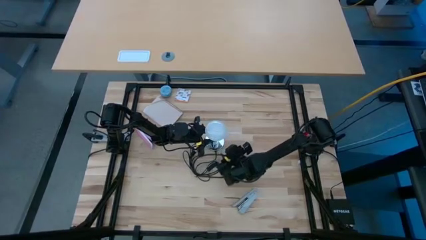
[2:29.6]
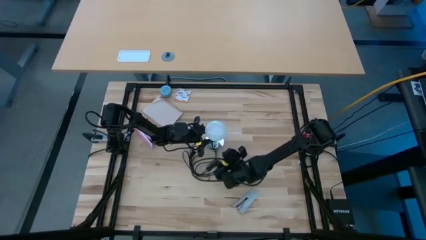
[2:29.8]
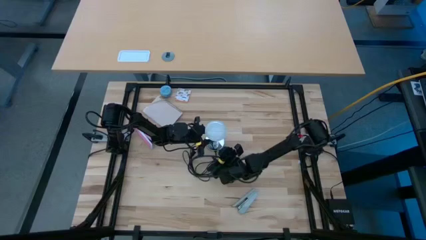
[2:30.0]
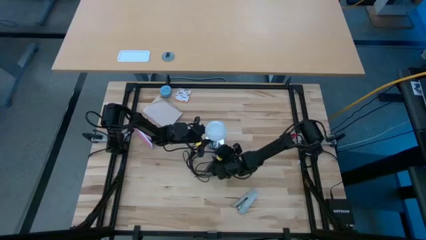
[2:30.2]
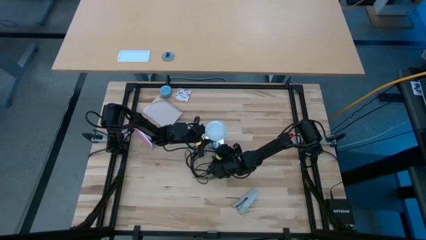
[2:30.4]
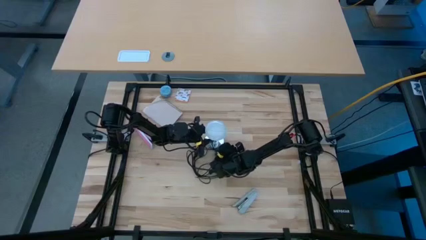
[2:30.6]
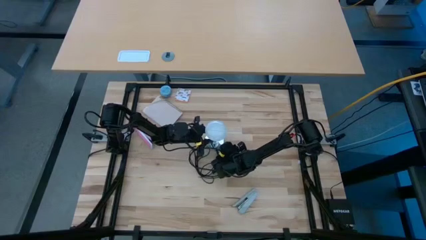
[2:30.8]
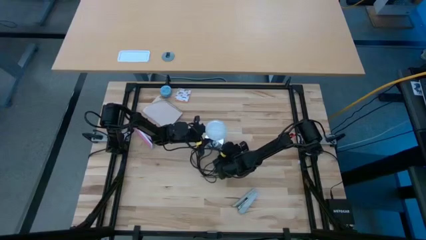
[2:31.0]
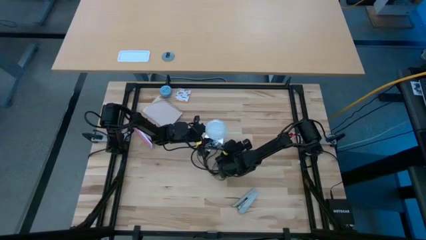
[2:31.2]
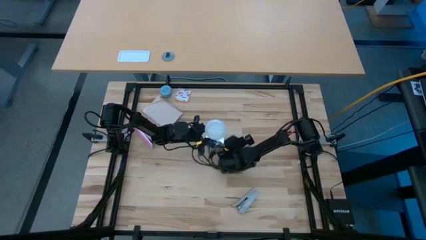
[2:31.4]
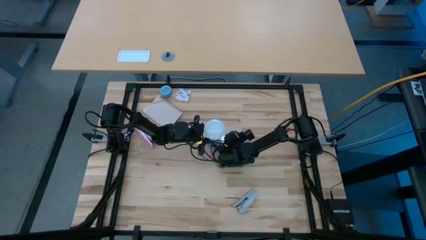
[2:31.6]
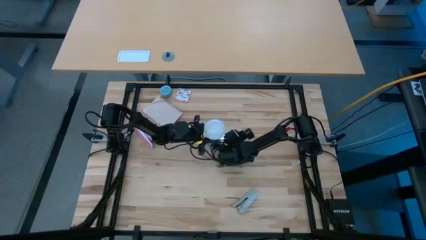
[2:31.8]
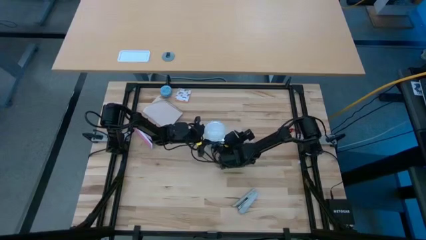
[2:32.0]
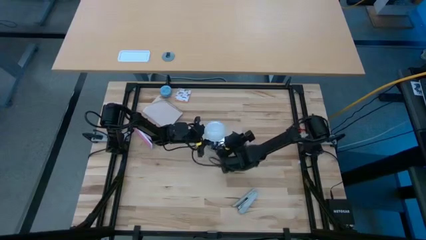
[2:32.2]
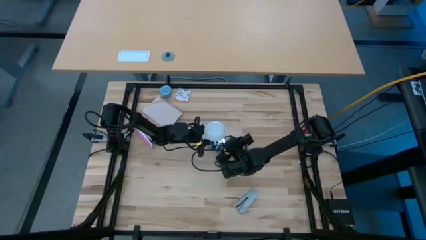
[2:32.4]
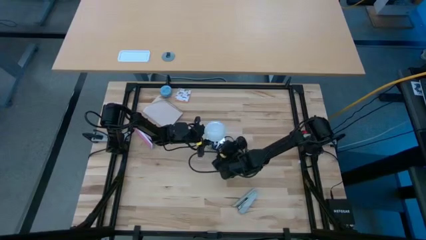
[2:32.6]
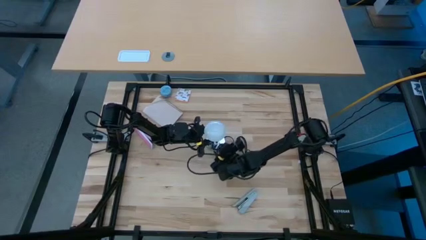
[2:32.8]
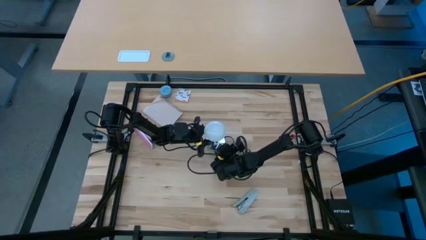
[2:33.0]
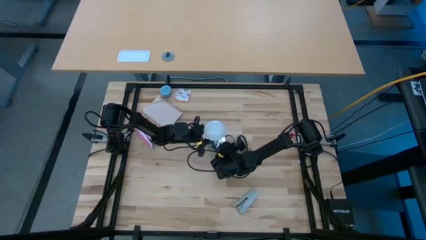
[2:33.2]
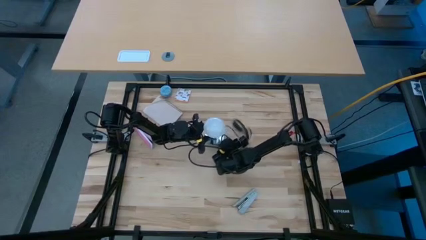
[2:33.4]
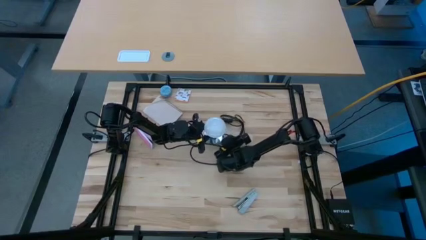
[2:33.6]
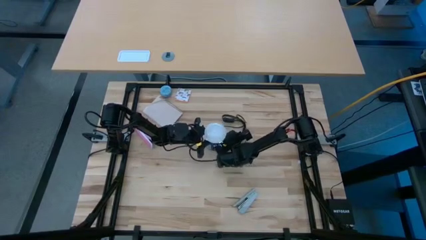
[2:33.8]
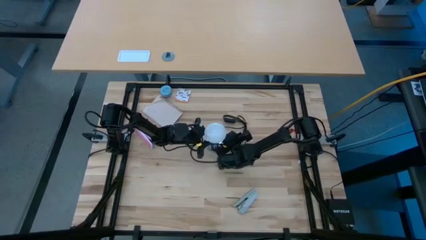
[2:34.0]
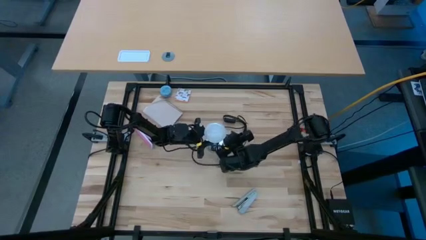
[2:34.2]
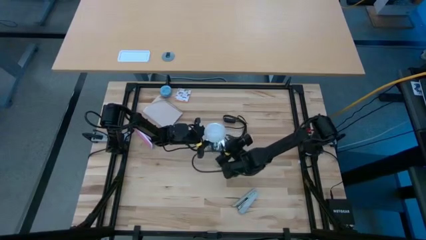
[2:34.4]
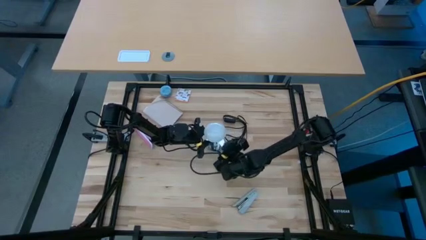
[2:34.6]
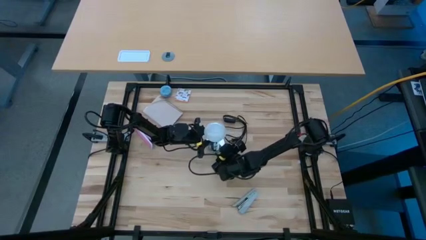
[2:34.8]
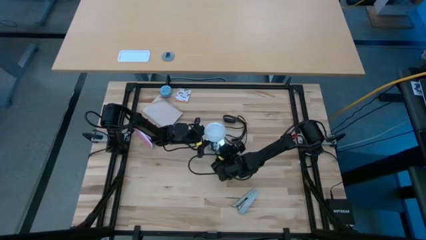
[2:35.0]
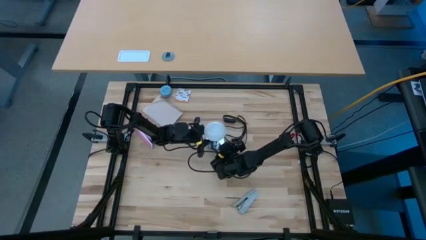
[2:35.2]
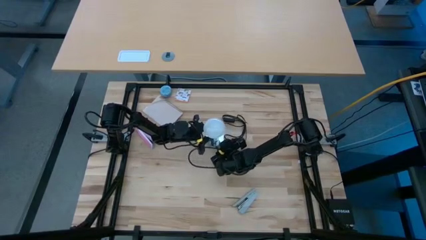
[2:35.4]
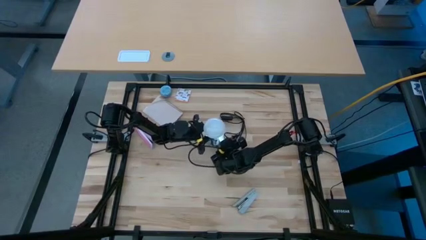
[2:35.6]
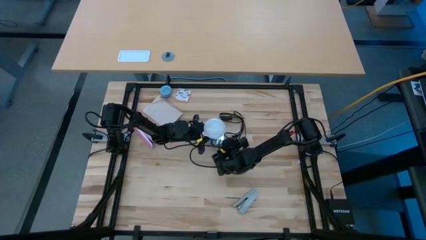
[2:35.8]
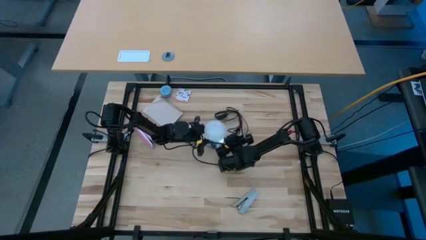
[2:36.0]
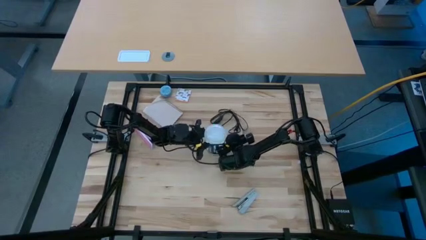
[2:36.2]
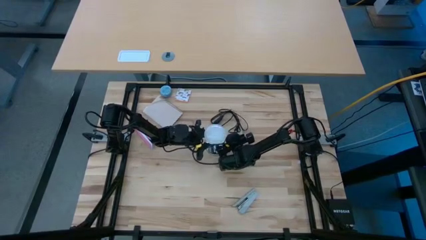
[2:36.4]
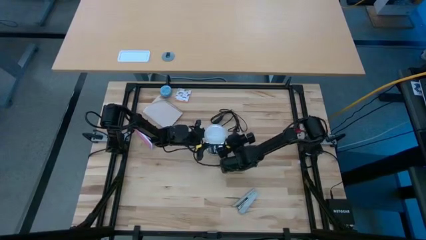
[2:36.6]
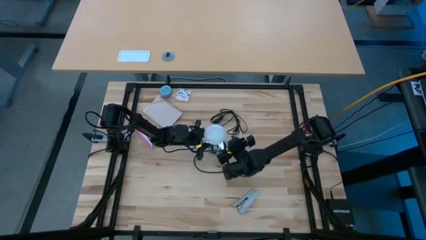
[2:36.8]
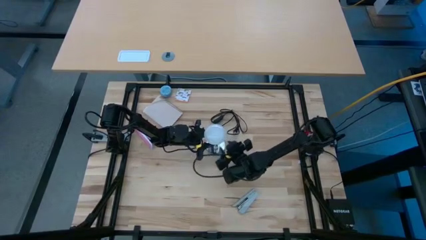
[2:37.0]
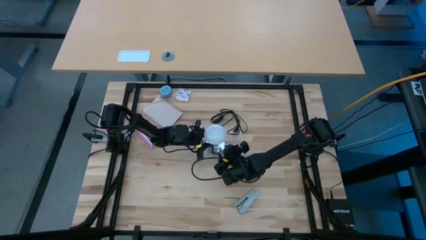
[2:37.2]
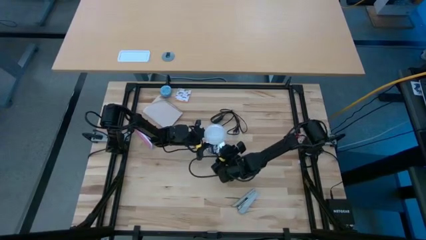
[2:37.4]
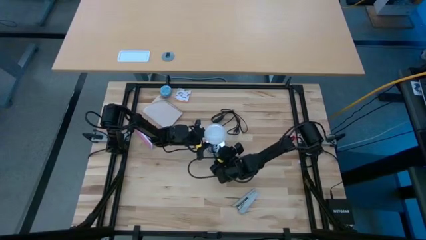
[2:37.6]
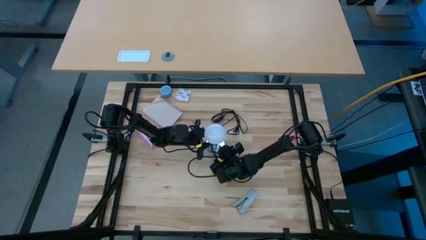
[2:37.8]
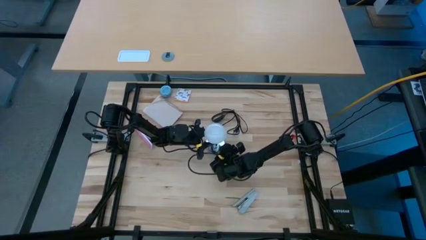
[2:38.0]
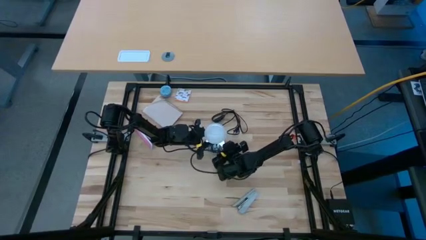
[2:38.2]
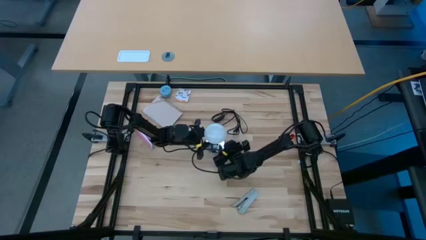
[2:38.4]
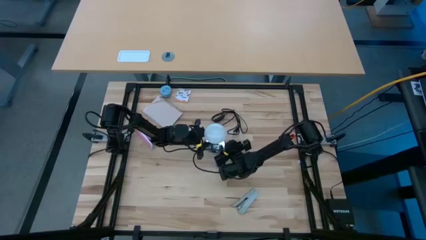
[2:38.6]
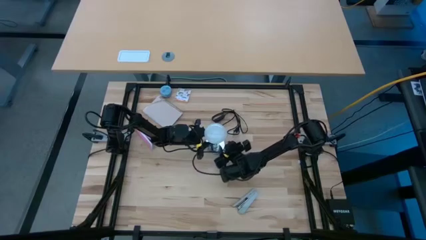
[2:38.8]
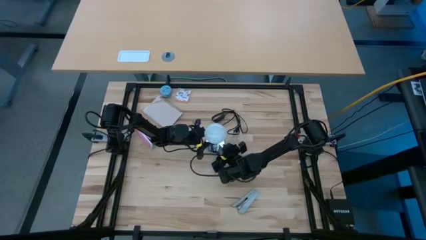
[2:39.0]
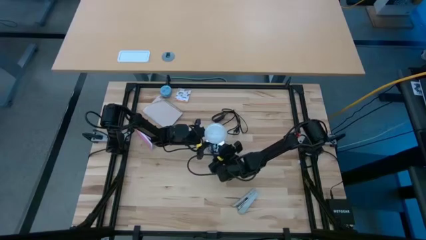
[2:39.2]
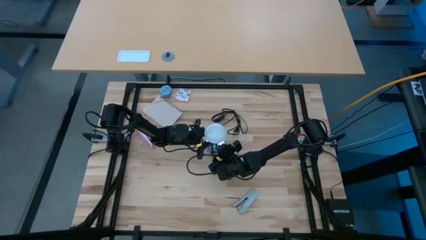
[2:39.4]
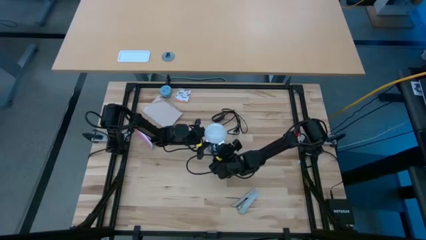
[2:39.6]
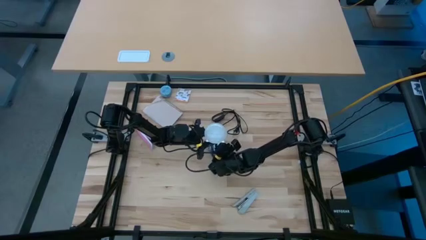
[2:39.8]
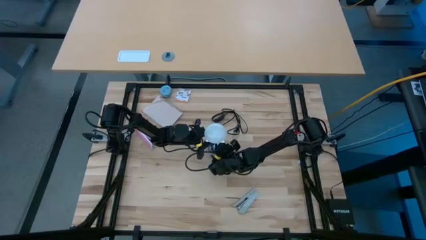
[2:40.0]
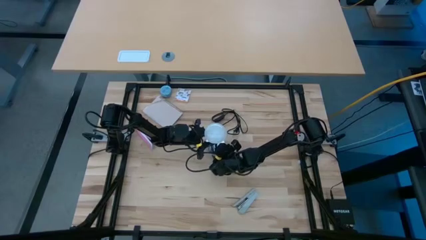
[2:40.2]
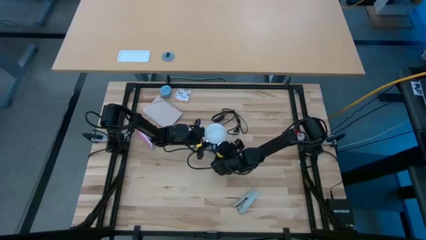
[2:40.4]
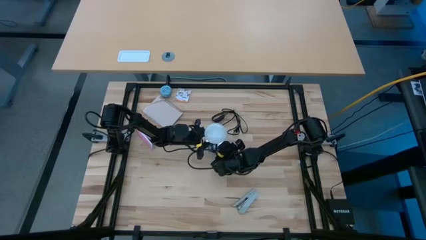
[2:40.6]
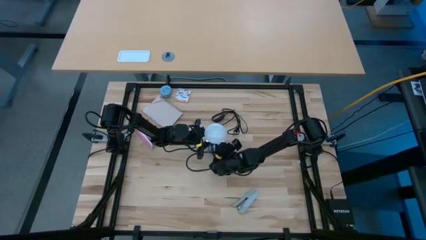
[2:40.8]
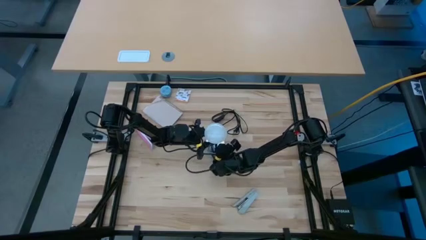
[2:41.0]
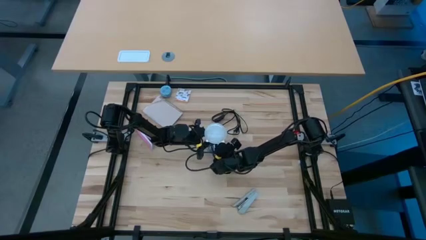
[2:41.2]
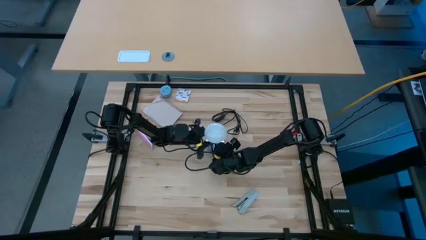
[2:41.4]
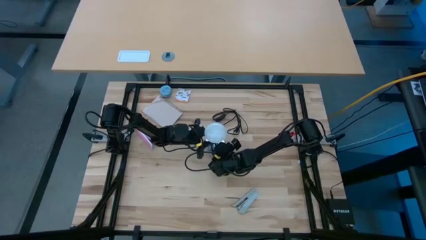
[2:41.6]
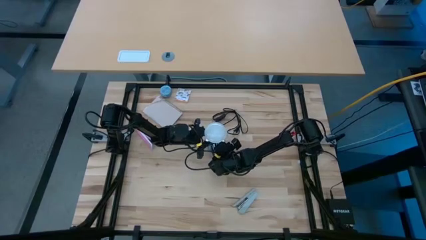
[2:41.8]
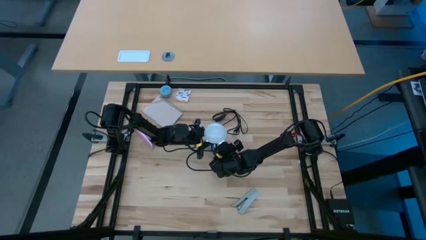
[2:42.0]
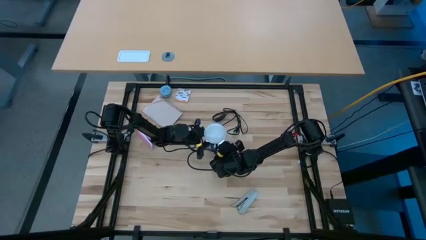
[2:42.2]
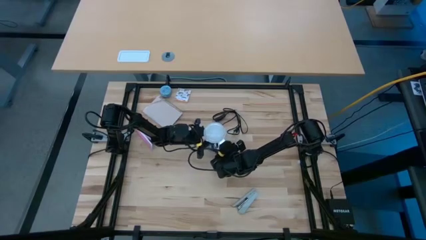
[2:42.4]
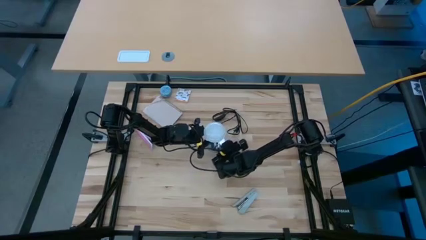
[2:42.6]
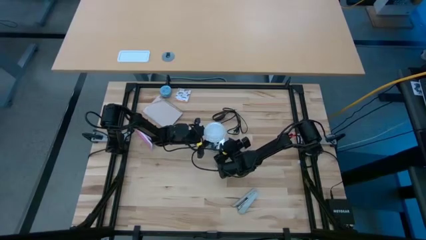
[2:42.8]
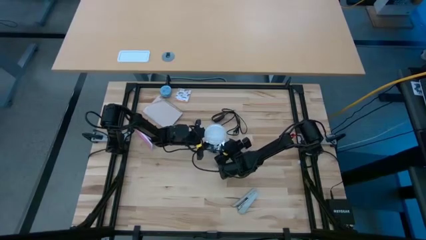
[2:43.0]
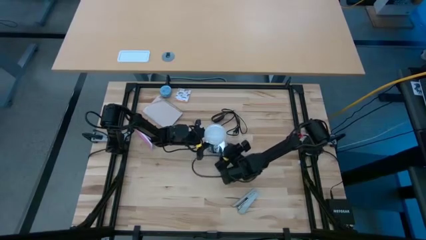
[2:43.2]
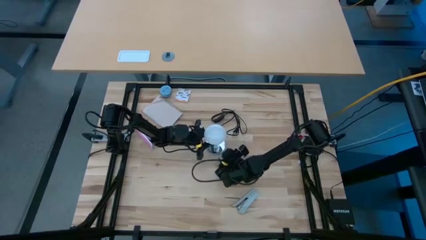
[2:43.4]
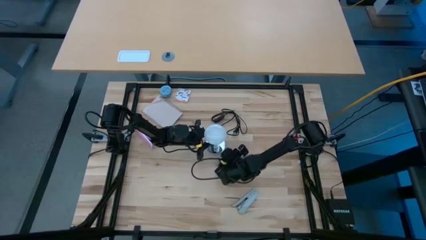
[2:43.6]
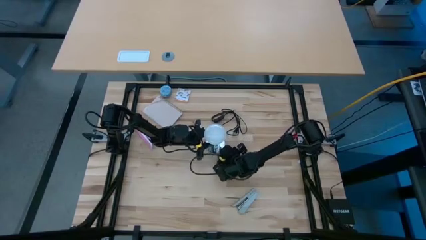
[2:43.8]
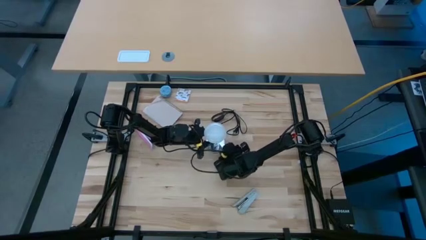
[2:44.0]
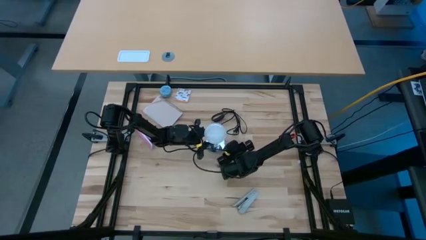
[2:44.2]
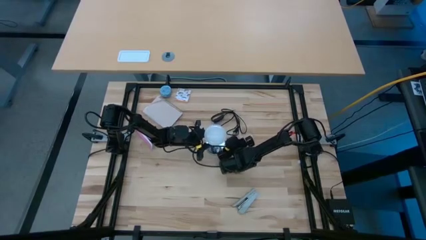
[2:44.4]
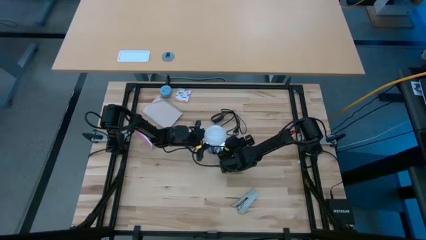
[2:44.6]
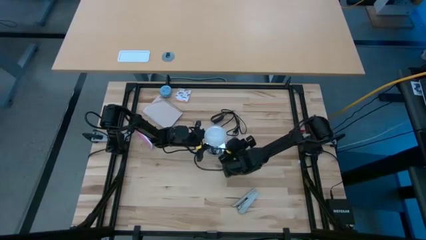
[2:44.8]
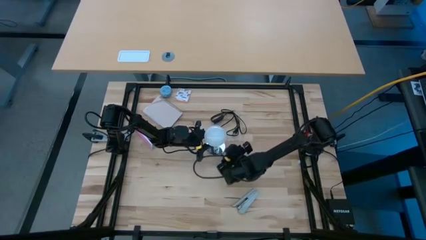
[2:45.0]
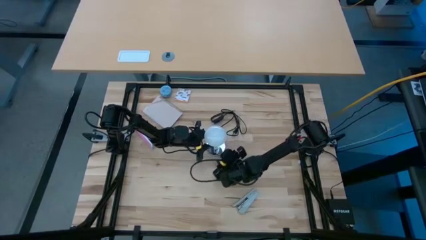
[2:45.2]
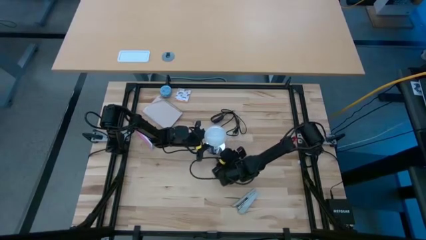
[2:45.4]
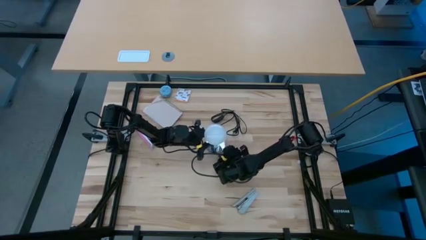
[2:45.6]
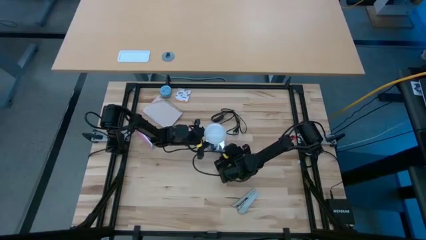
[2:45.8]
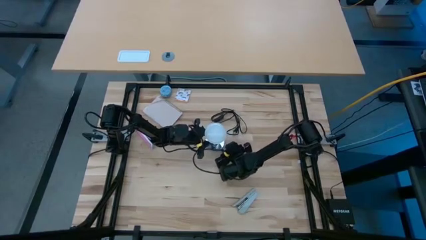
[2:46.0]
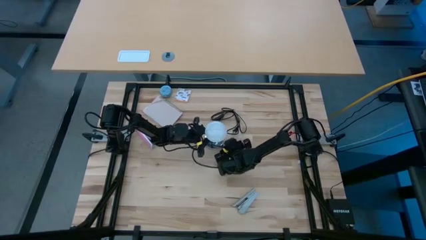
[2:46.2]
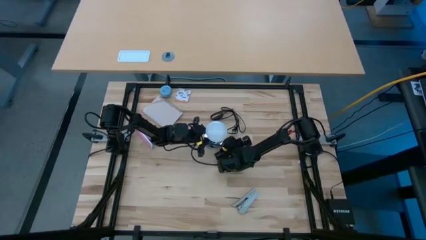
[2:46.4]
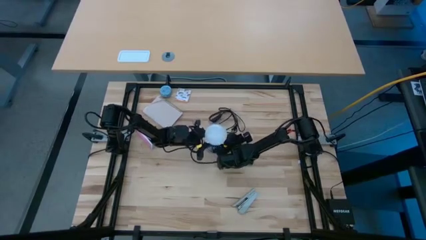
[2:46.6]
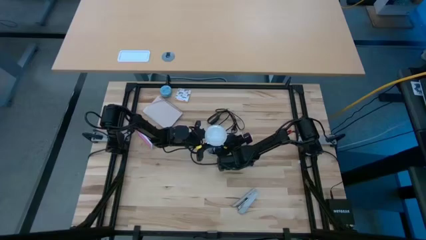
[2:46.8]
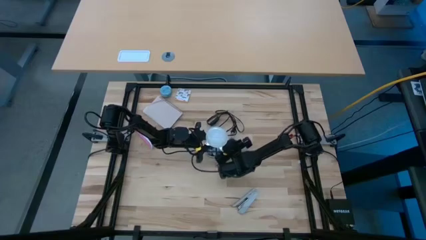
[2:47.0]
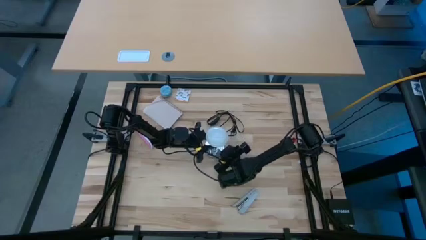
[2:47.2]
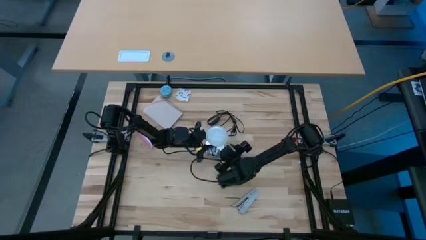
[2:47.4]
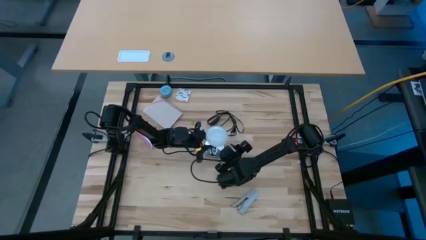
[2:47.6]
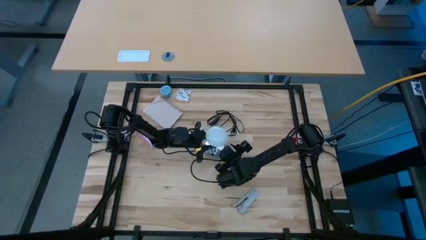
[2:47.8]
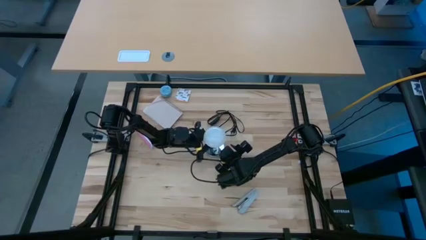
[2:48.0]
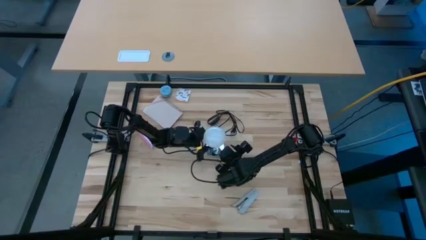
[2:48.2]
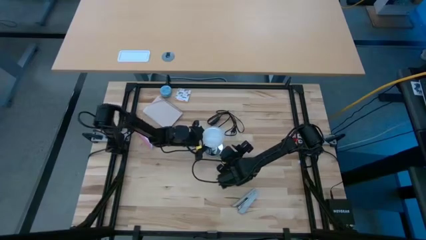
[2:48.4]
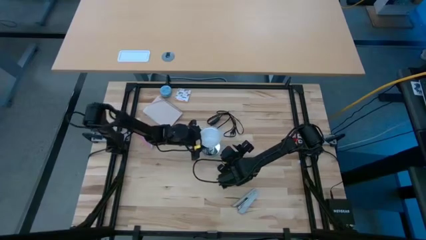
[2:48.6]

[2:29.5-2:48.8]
Task: Screw lightbulb
Insert the light bulb into the lamp
